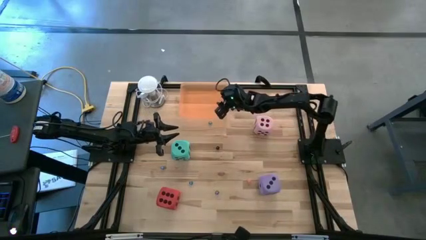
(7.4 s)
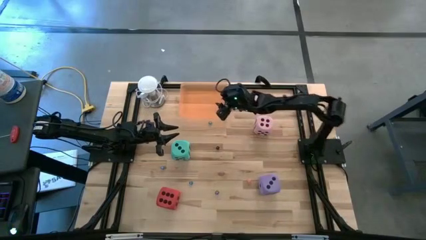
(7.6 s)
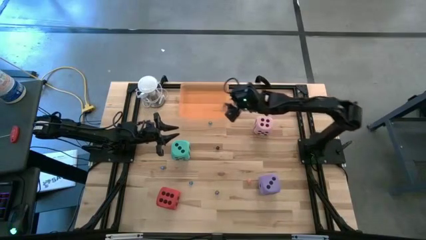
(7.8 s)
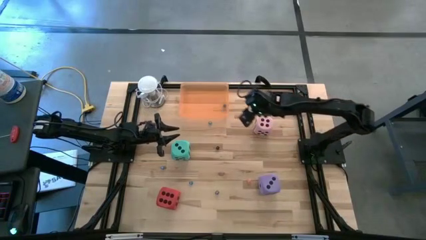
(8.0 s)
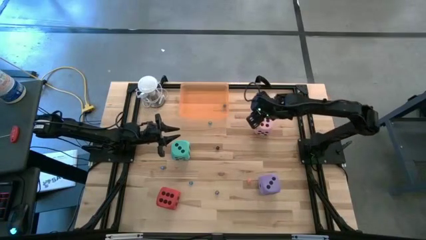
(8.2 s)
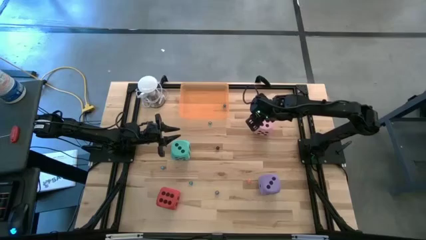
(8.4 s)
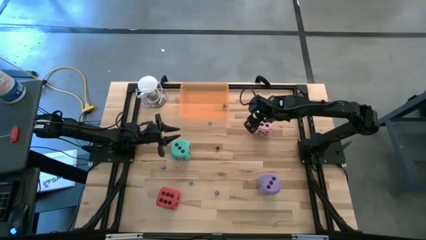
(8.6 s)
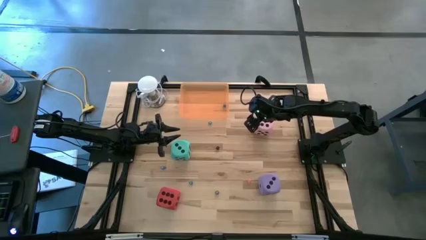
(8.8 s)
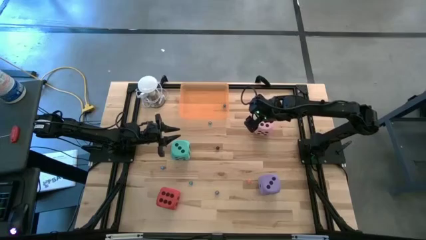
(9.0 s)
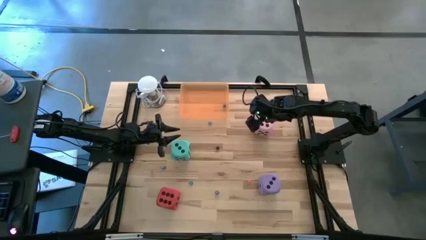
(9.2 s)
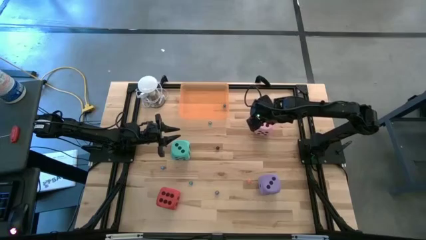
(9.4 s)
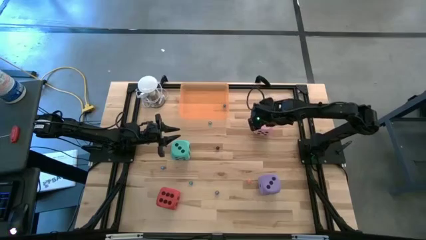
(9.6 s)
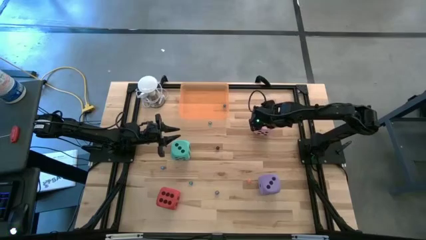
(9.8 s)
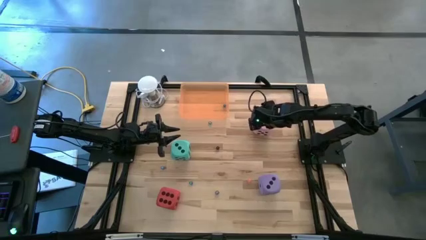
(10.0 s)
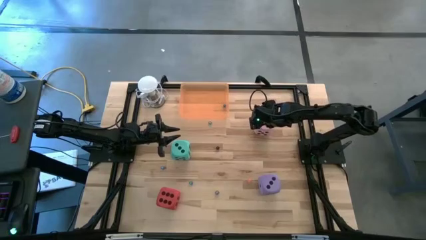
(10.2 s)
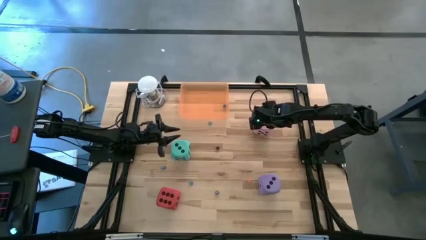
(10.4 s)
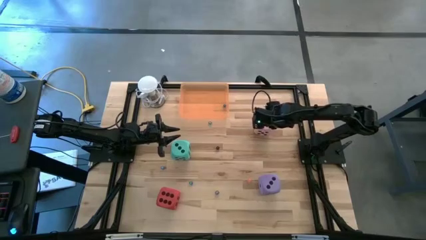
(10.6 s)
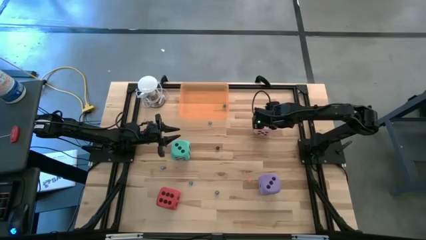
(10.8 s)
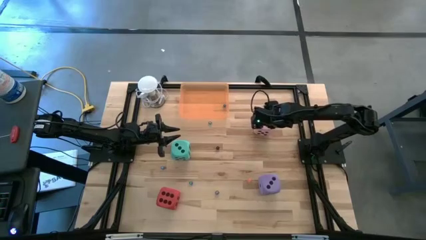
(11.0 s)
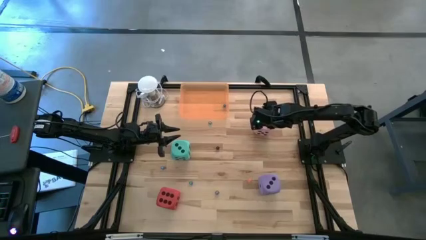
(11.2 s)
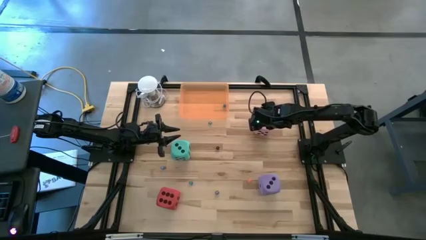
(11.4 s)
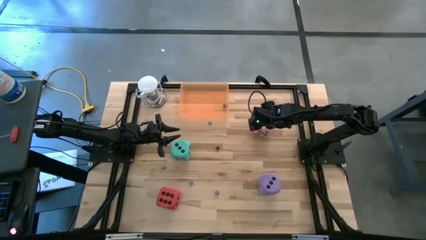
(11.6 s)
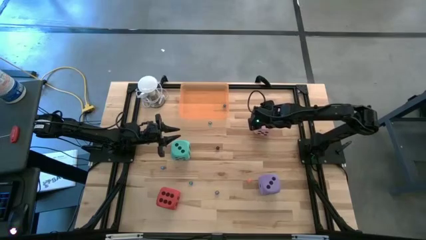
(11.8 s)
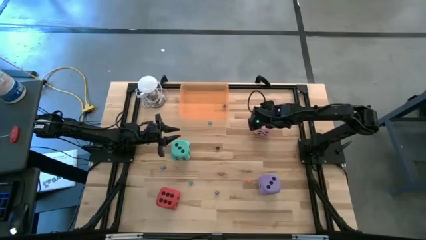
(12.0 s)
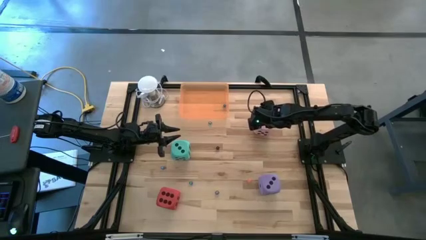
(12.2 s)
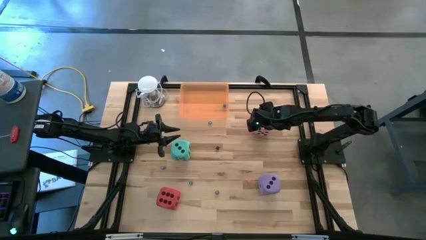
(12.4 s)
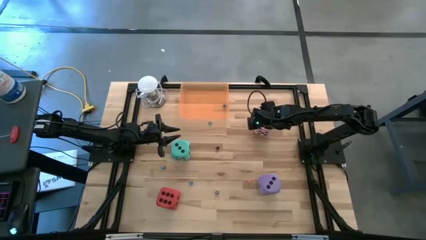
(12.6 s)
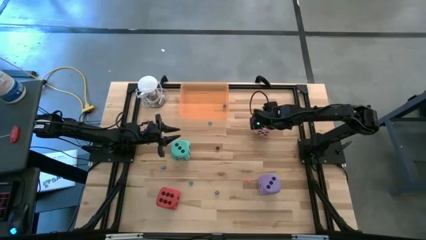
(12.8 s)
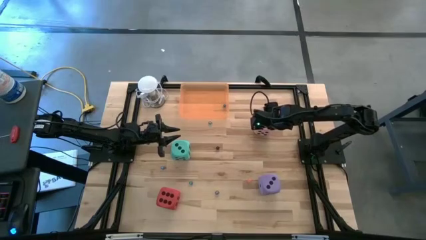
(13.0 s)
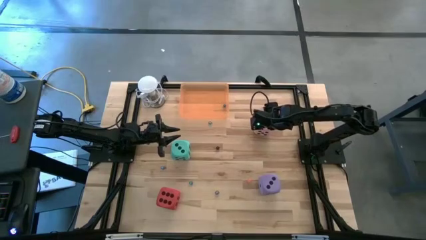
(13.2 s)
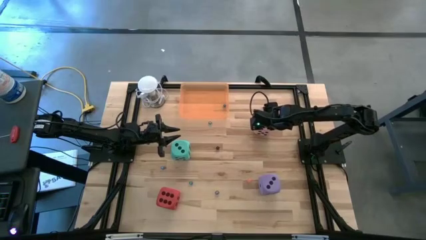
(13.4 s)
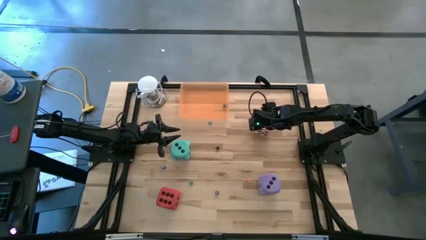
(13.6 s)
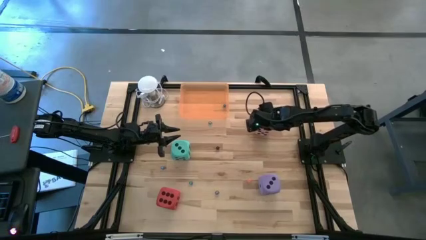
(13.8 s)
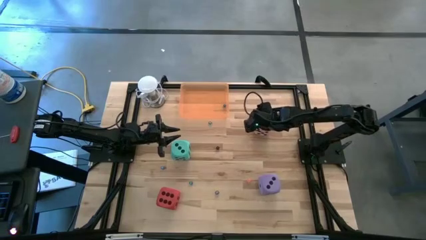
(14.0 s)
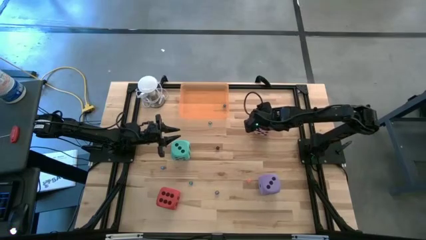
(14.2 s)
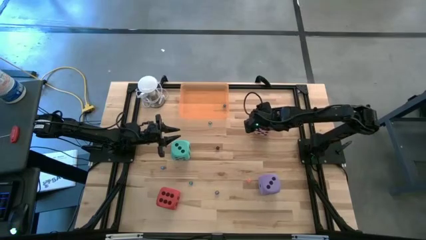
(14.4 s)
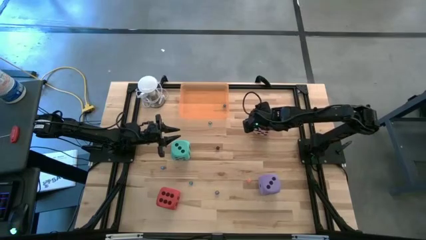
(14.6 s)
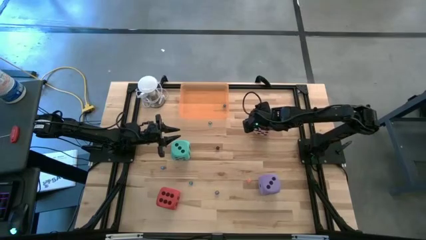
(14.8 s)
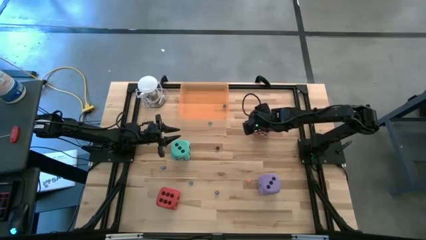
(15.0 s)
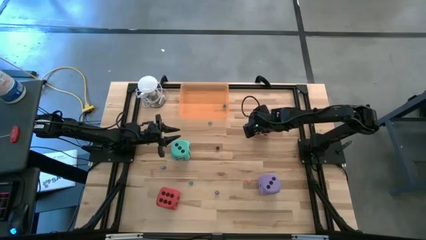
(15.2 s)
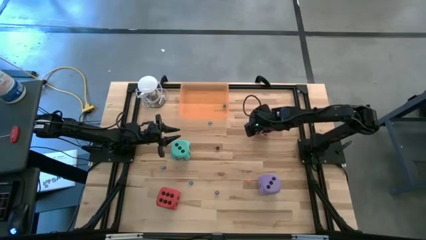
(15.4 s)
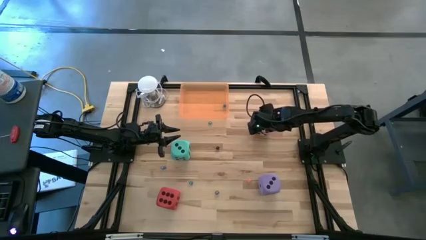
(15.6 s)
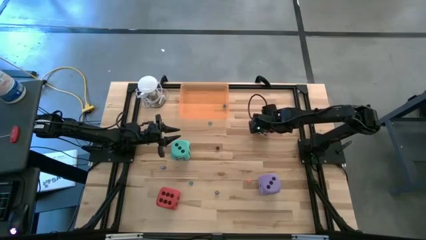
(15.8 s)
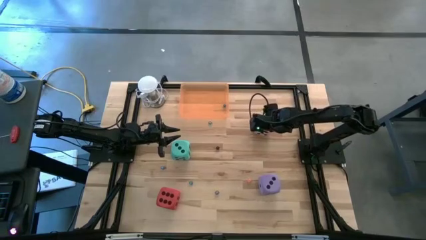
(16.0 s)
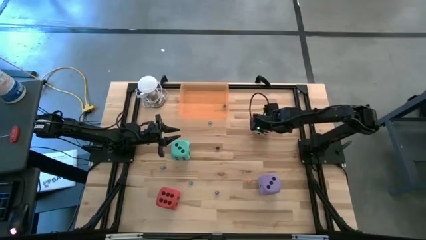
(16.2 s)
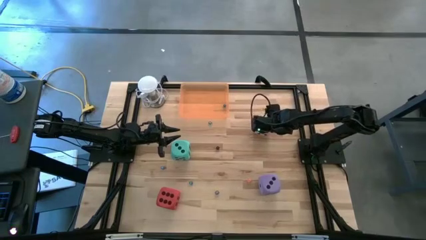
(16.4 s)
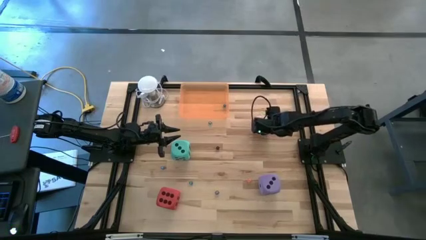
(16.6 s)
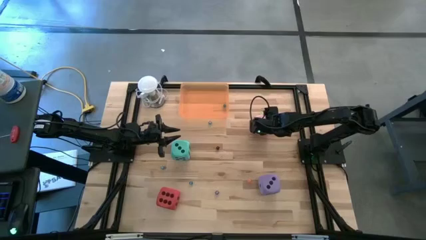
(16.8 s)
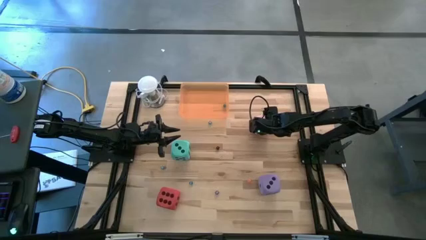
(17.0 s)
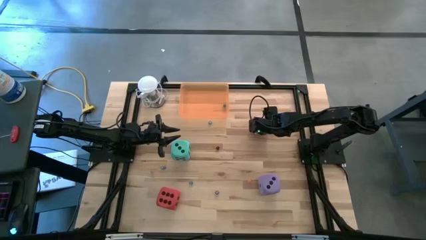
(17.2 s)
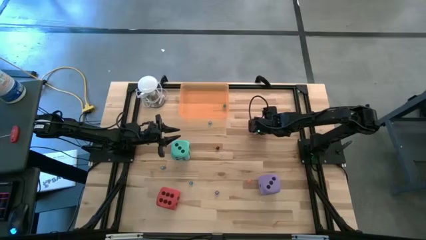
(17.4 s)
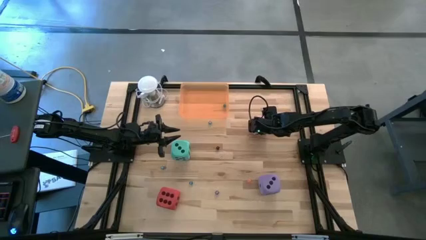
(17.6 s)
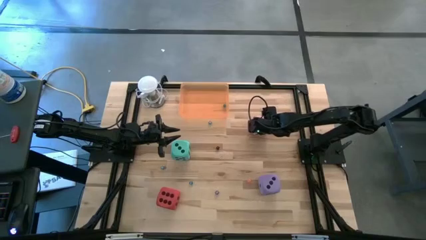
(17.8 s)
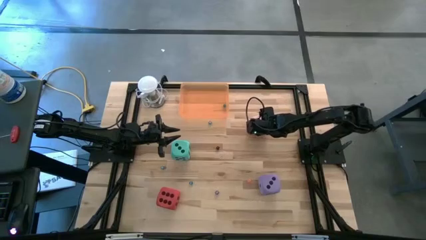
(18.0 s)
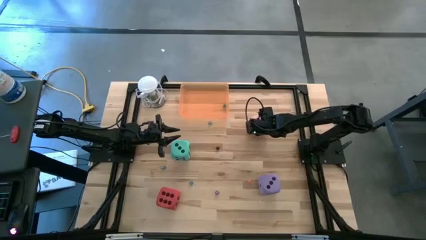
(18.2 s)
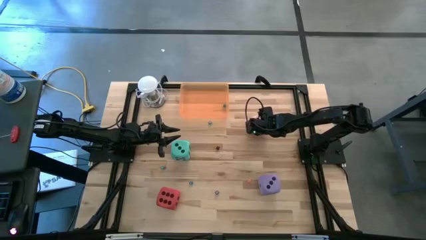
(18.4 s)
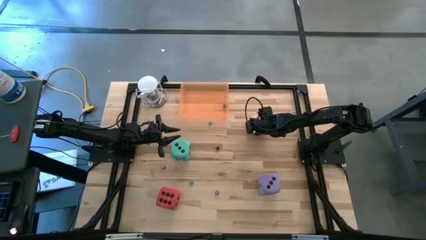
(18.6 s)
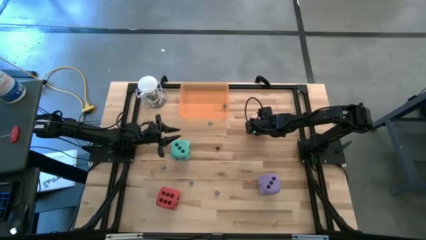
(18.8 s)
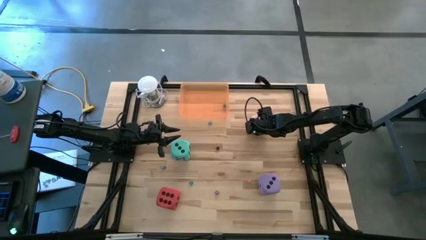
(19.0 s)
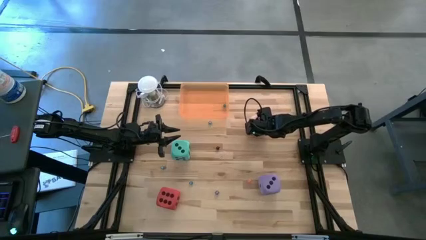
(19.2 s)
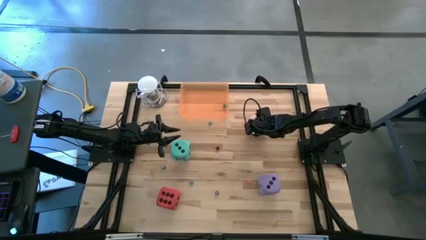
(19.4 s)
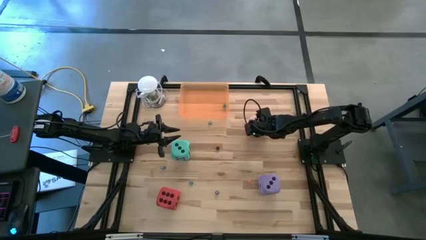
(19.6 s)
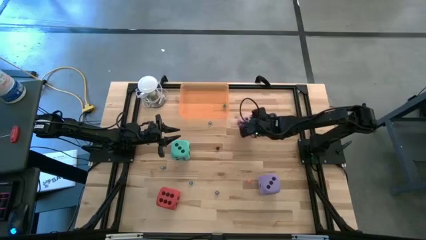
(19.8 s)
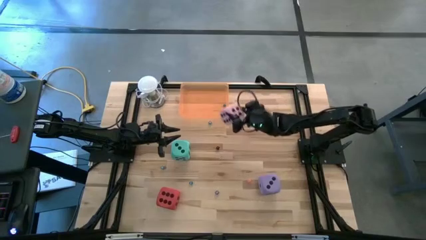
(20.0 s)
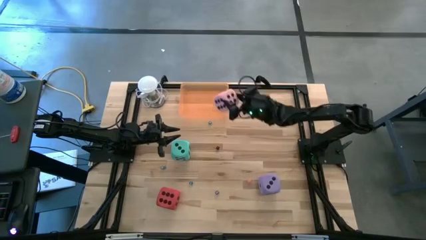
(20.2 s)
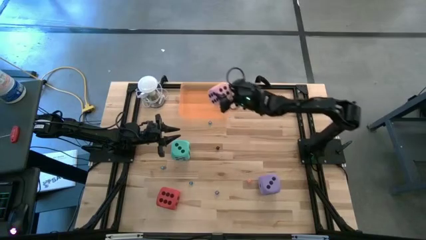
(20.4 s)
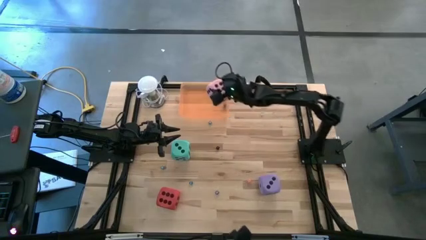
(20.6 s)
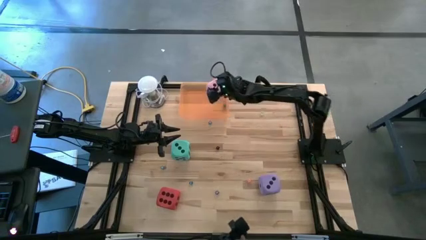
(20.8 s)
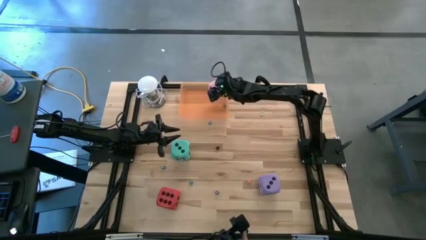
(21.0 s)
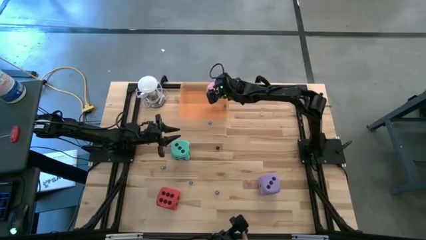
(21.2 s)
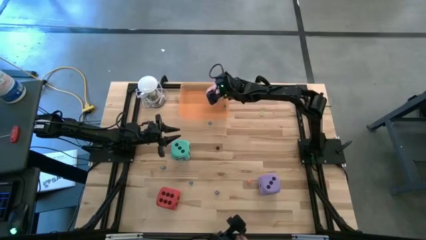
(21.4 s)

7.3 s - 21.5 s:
Task: Pick & Place Dice
Put the large pink die into the bin

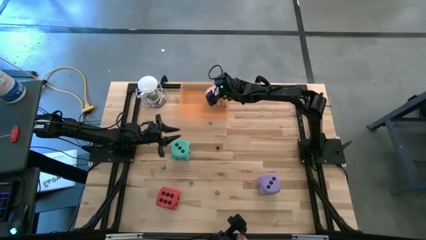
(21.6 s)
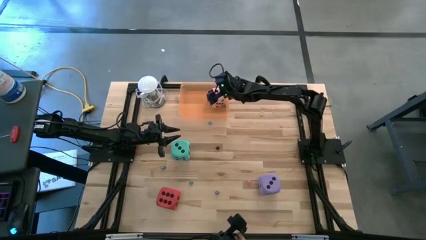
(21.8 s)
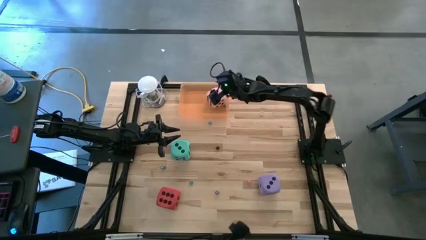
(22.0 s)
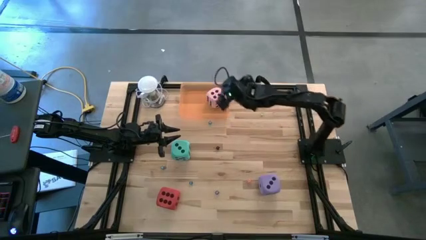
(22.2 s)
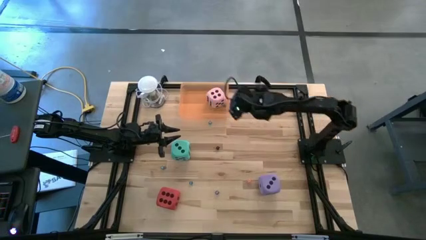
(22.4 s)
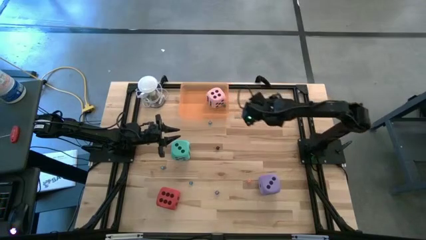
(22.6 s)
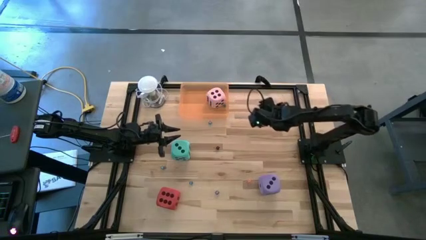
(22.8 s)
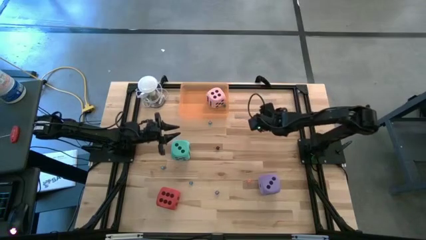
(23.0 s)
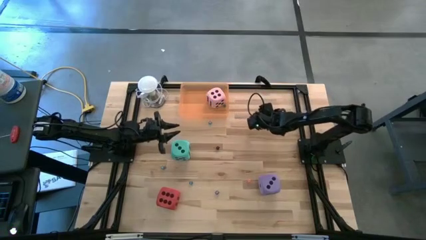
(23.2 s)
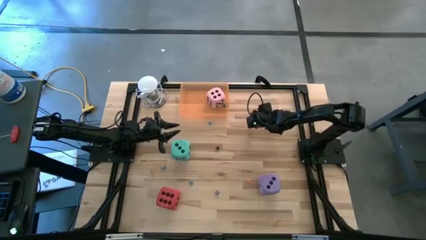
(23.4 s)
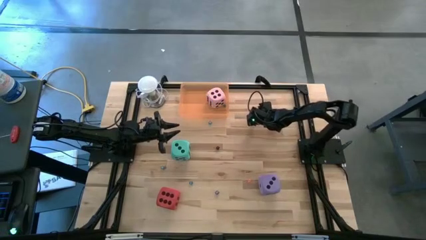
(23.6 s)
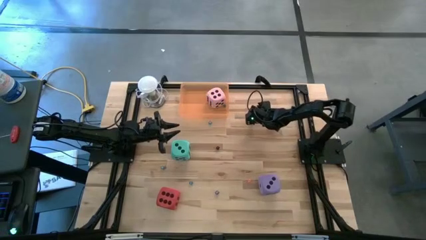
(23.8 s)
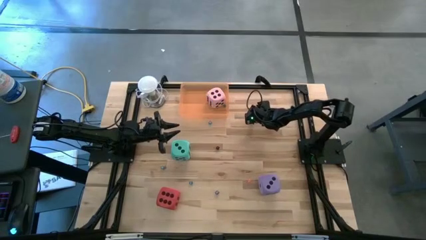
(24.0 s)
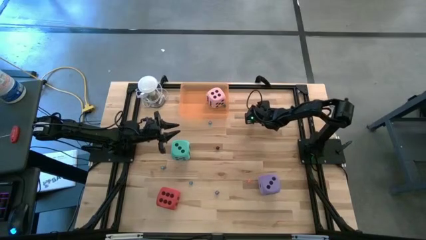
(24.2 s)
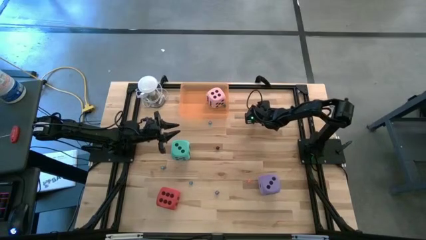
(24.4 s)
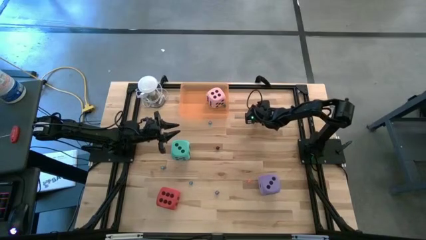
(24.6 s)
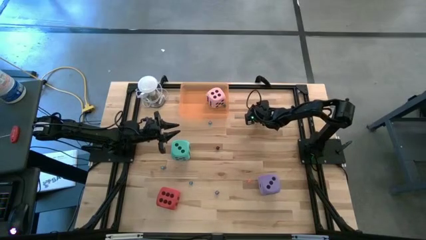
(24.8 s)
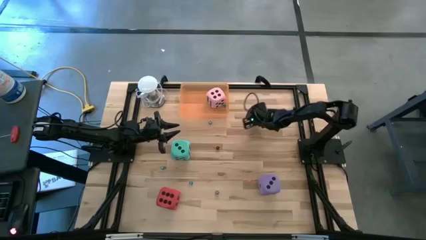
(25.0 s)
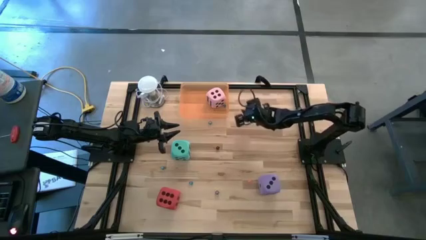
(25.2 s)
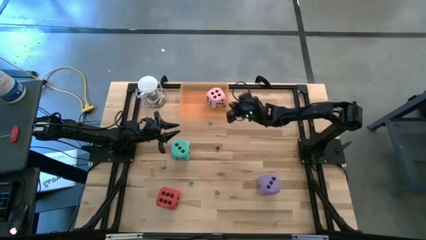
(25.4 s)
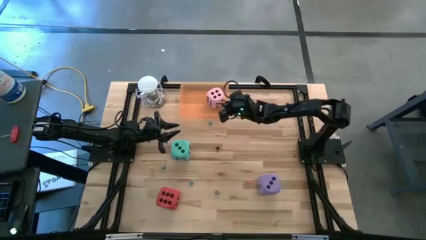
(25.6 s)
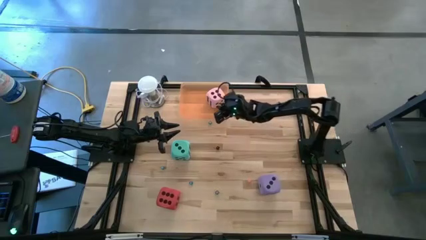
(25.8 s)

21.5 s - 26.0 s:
Put the small green die into the bin
